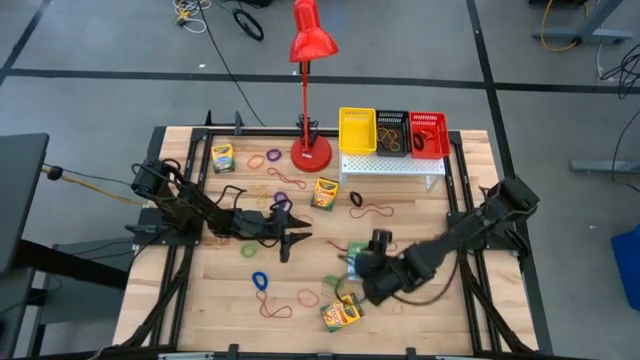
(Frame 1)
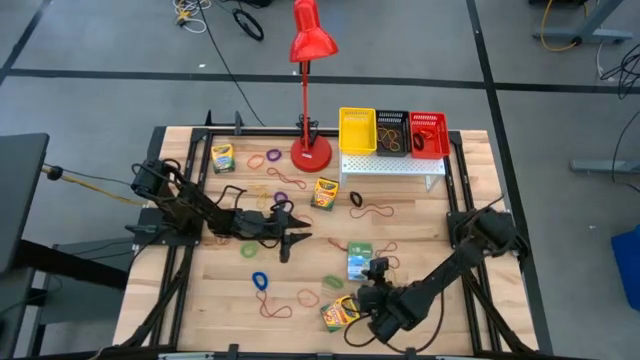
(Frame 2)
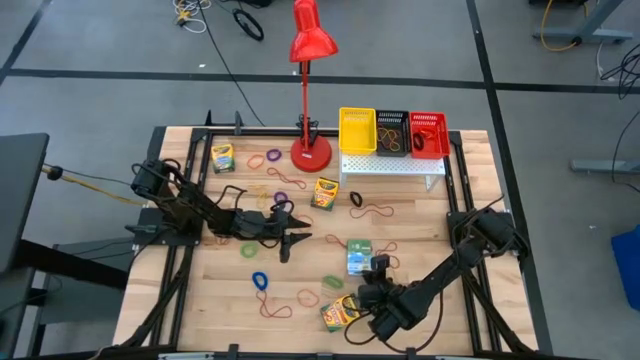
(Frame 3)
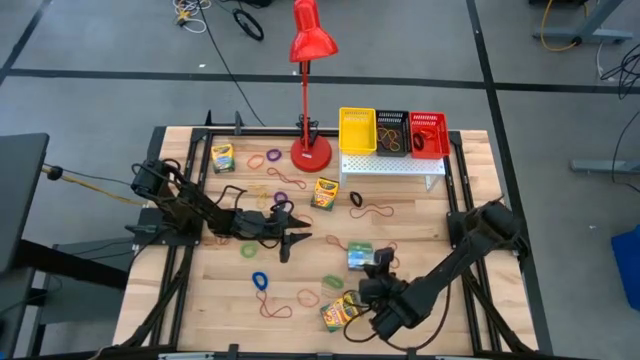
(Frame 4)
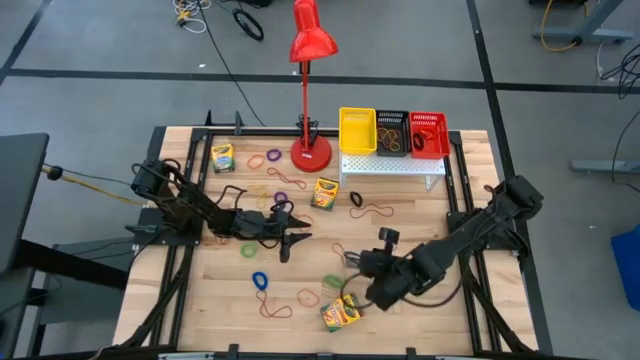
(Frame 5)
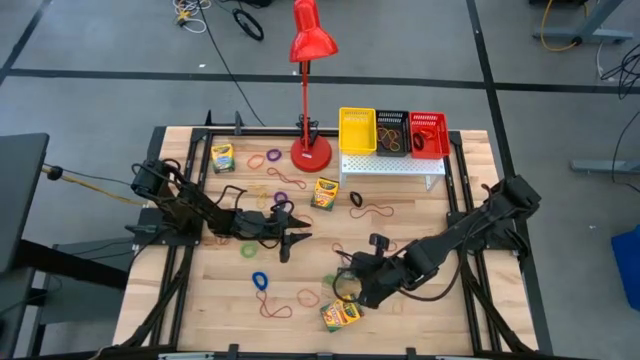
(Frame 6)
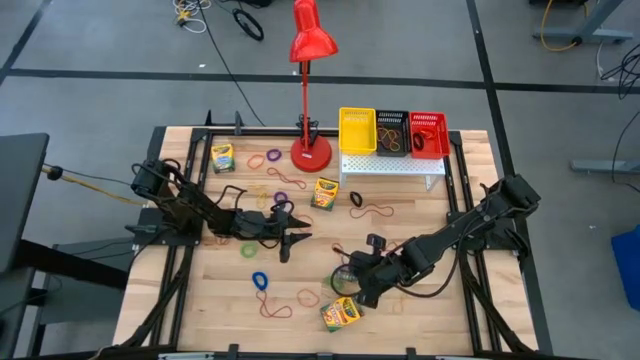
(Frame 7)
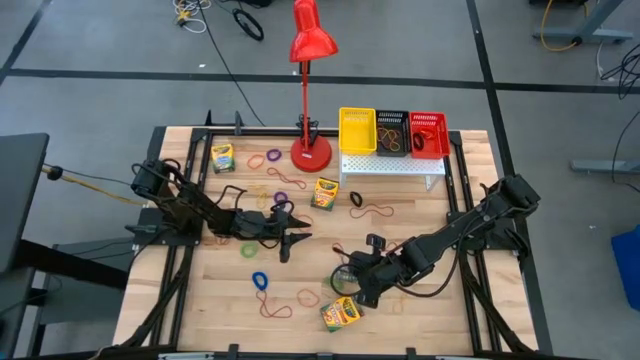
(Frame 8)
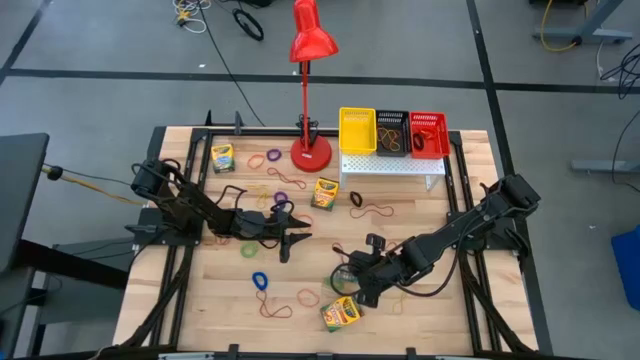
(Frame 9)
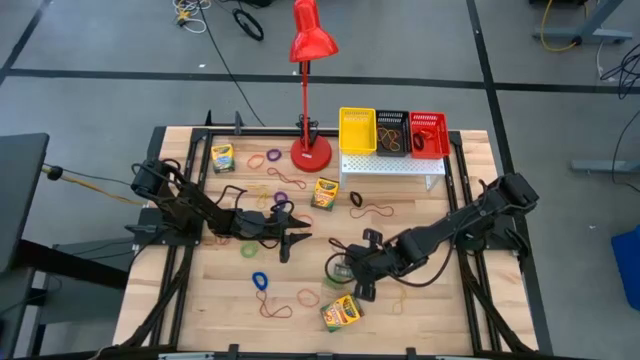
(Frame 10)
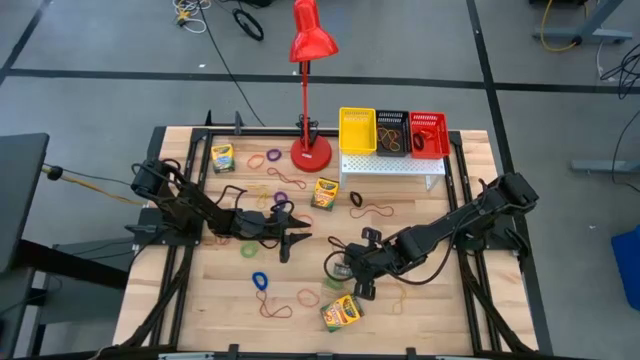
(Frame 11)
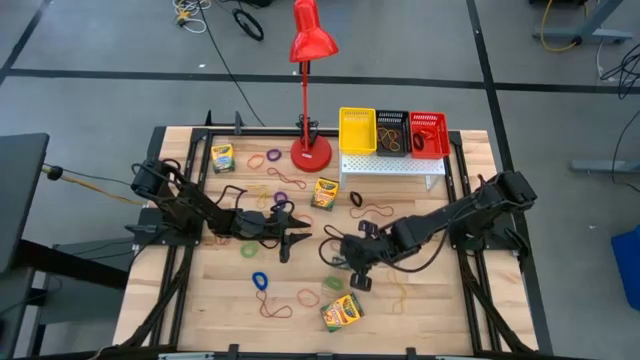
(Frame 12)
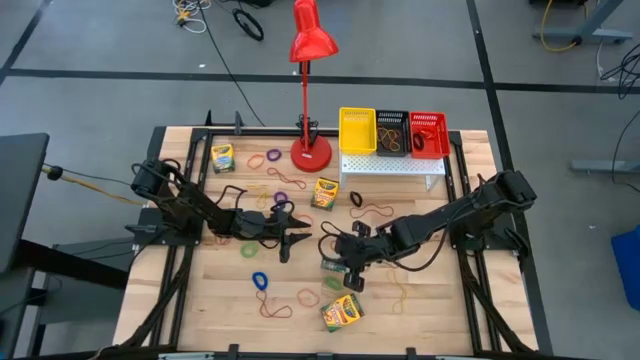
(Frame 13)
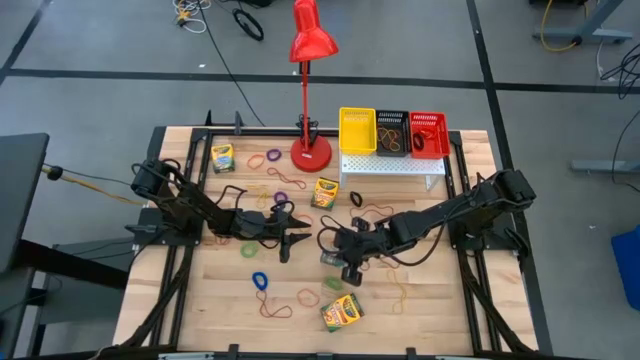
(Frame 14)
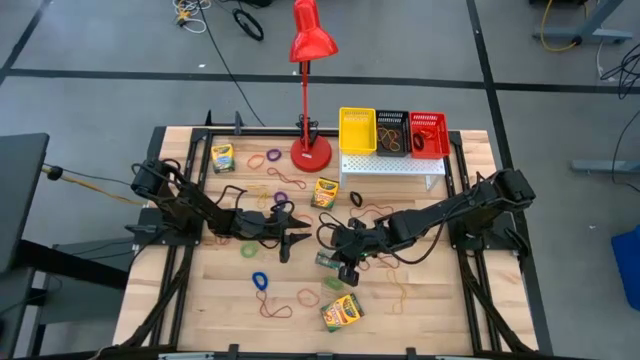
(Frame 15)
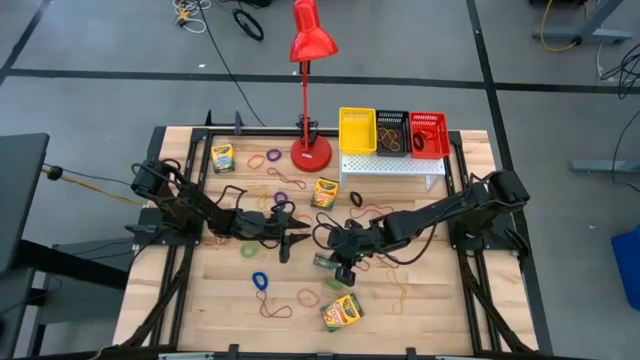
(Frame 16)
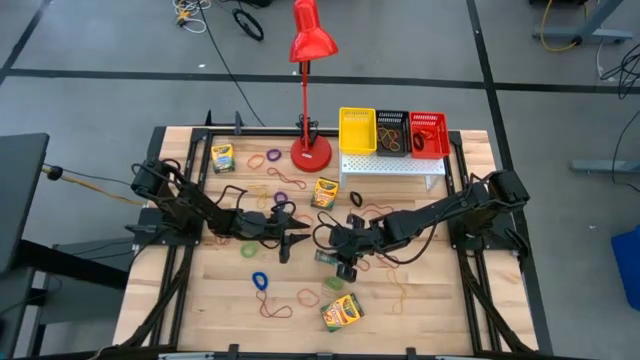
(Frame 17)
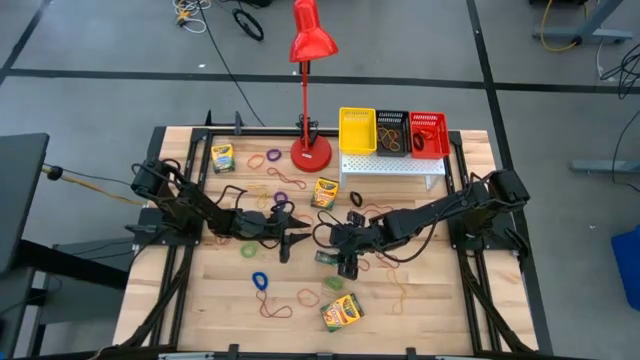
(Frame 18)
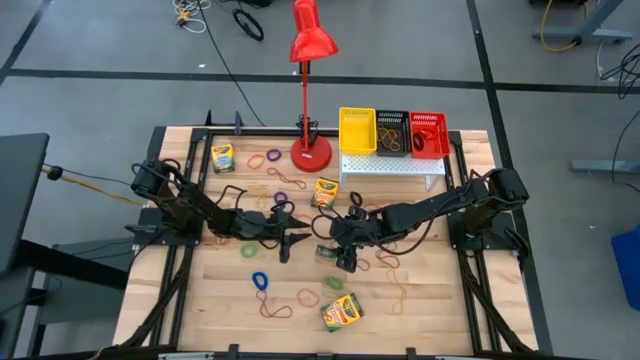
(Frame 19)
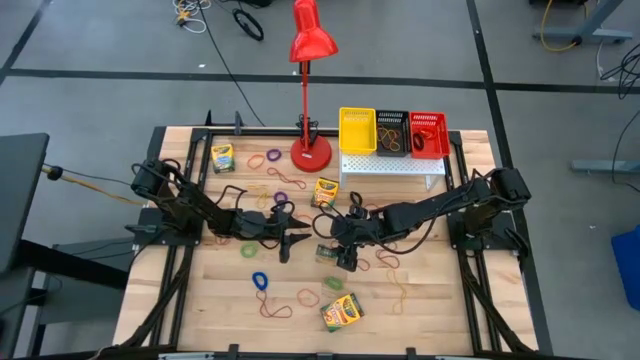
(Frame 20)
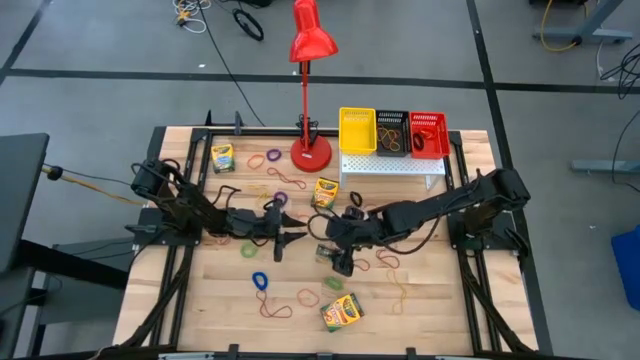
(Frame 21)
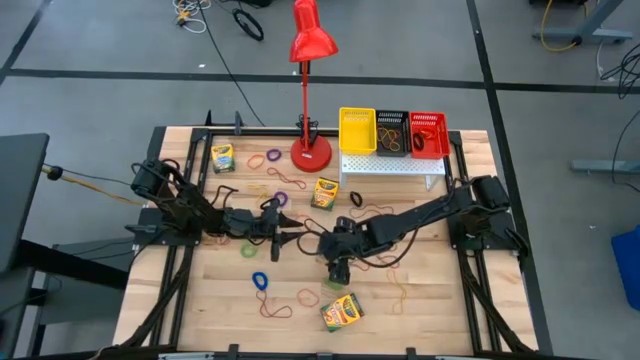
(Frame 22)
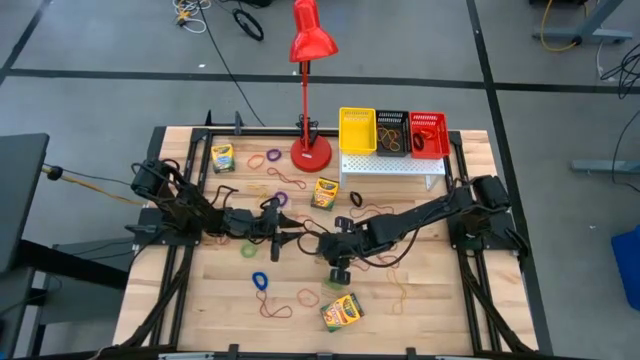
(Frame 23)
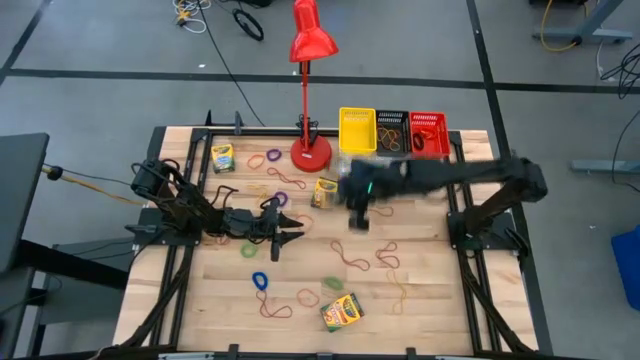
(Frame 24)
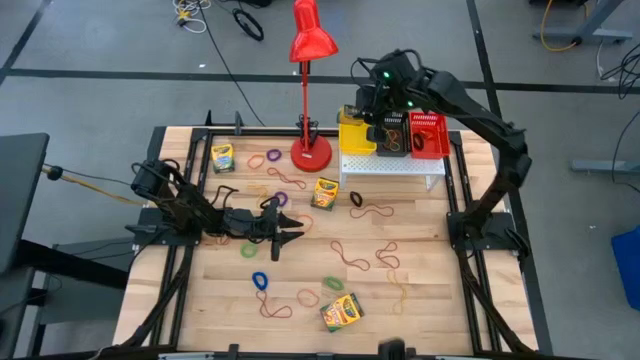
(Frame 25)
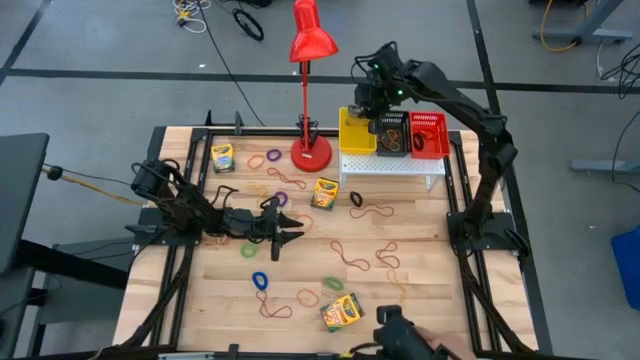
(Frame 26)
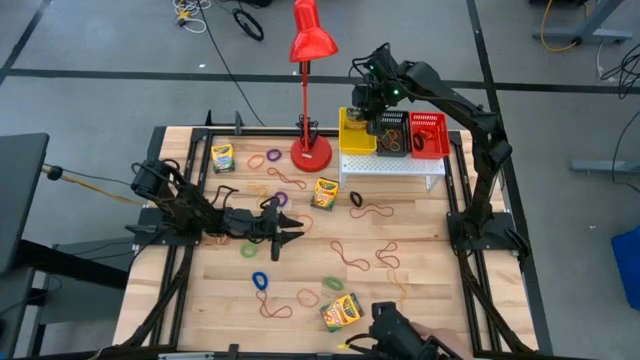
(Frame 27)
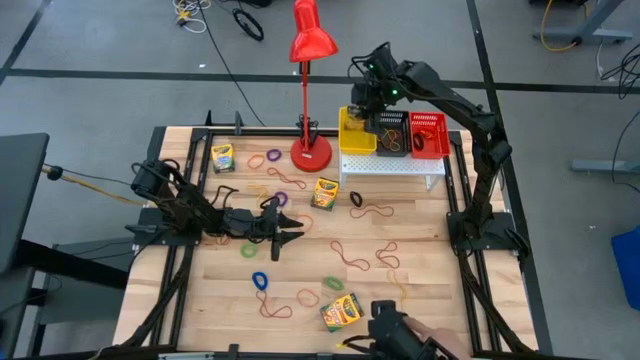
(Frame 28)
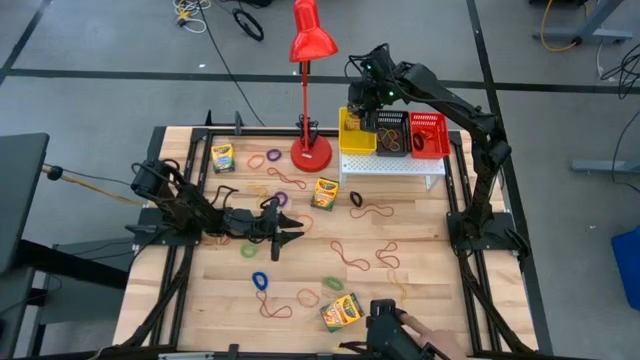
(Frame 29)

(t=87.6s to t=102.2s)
Task: Pick & Place Office Desk Supplies
Put the crayon box into the yellow bin on the shelf

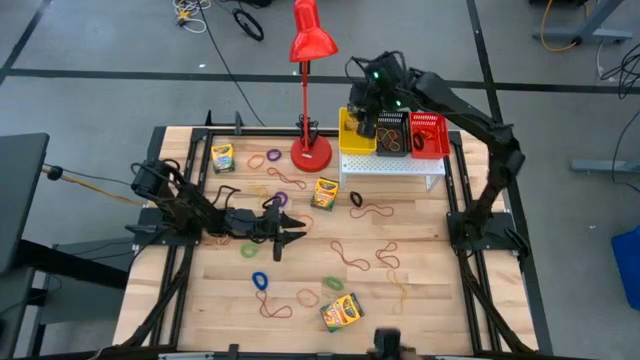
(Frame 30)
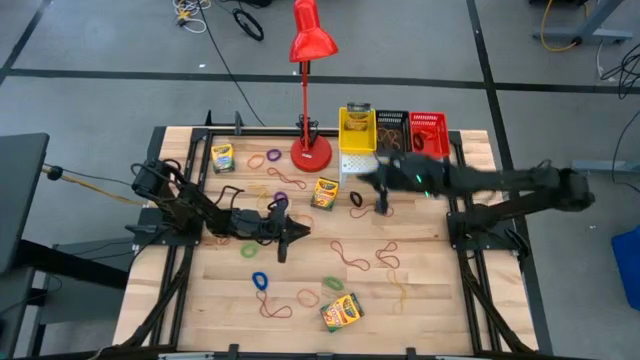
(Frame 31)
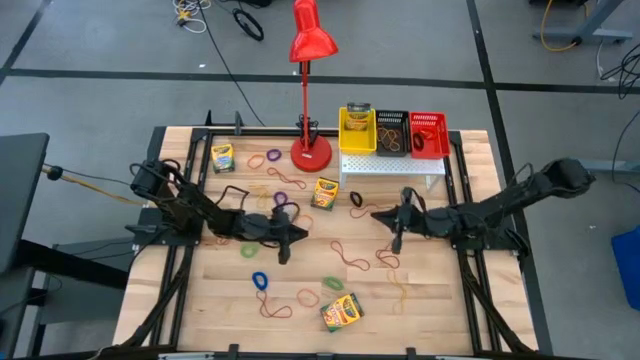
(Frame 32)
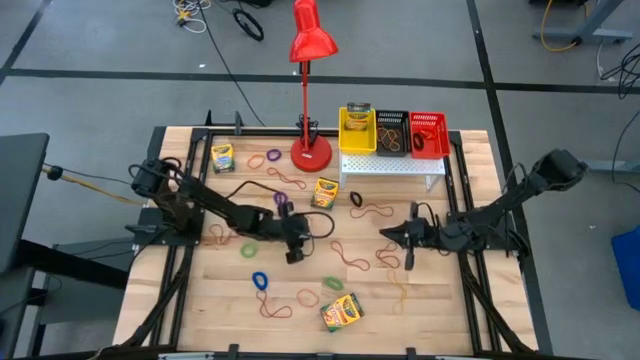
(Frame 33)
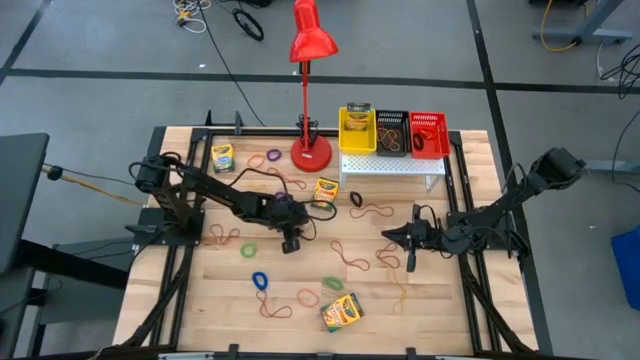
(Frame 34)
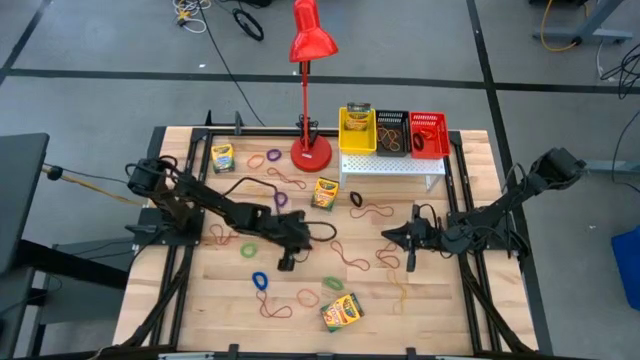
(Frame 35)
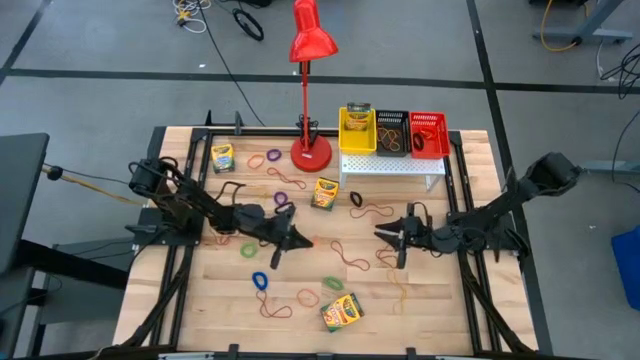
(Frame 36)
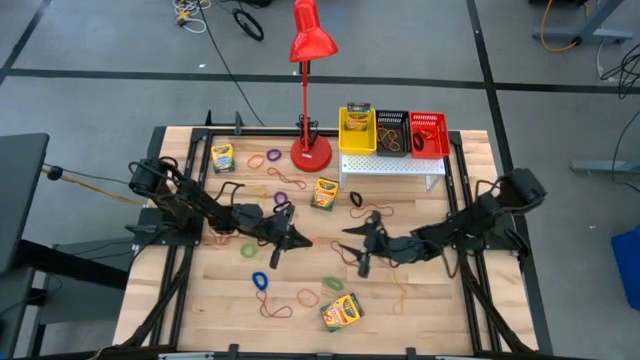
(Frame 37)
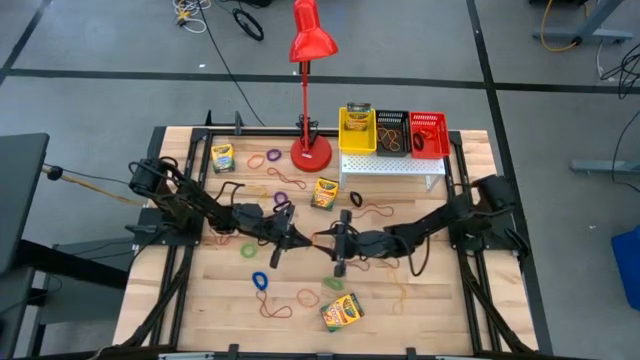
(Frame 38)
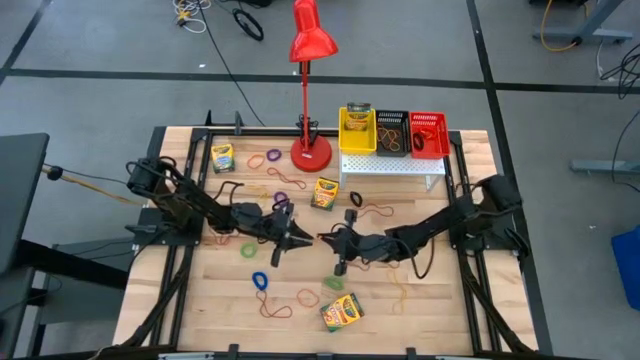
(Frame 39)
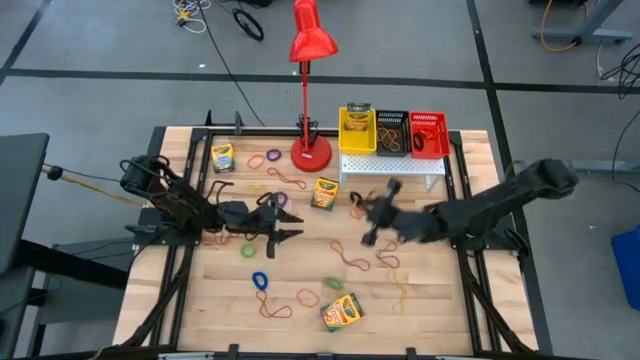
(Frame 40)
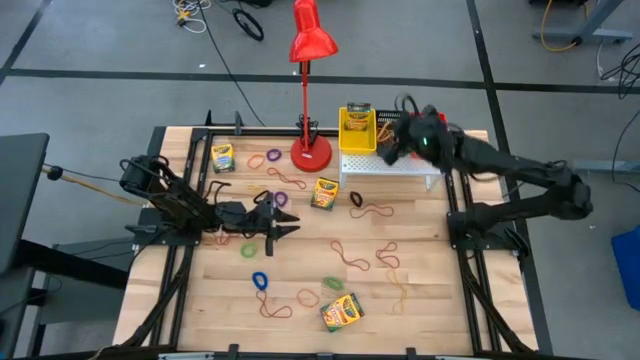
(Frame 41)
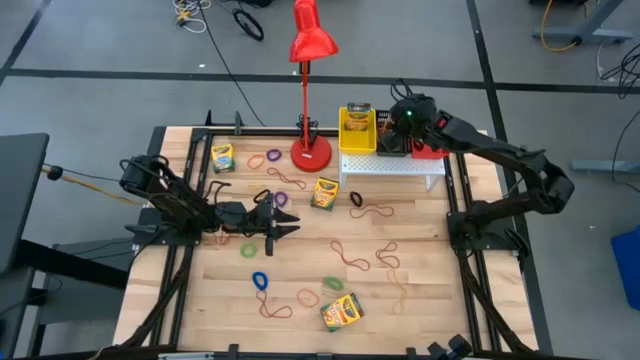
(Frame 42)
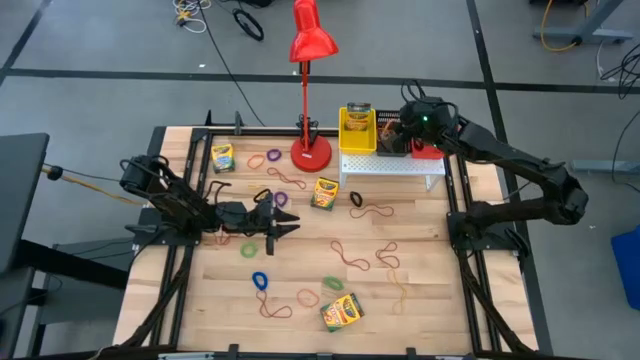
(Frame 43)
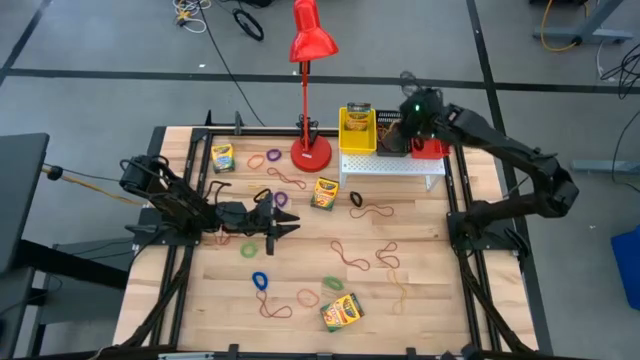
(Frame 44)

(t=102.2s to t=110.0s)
Put the orange rubber band into the black bin on the shelf
